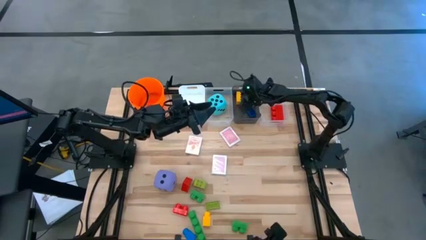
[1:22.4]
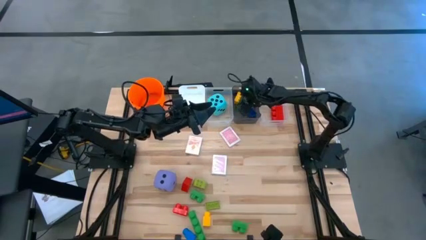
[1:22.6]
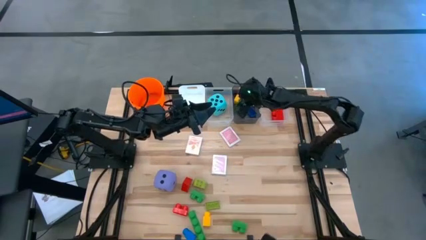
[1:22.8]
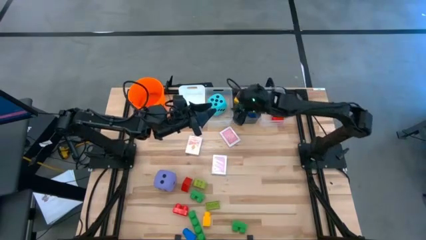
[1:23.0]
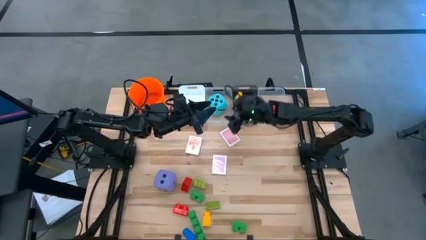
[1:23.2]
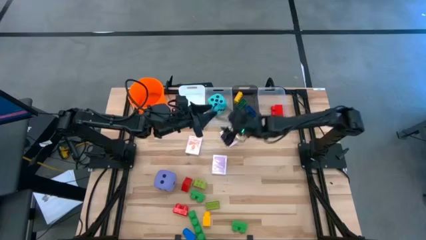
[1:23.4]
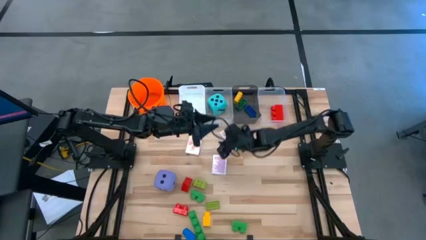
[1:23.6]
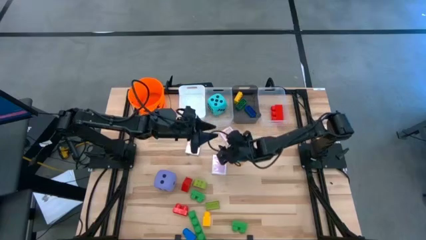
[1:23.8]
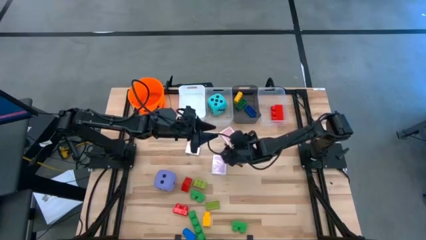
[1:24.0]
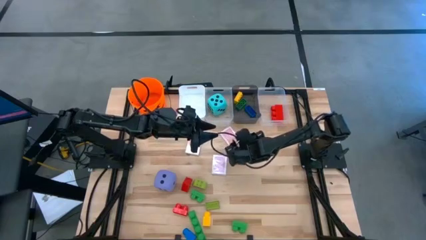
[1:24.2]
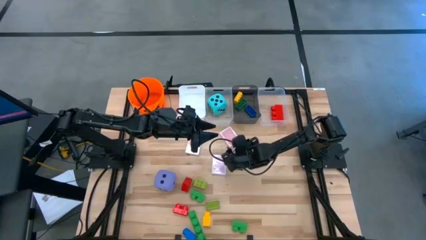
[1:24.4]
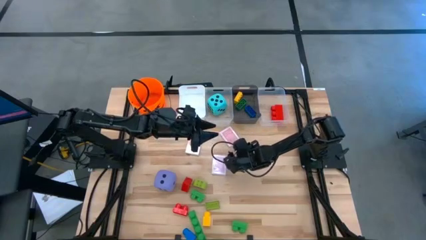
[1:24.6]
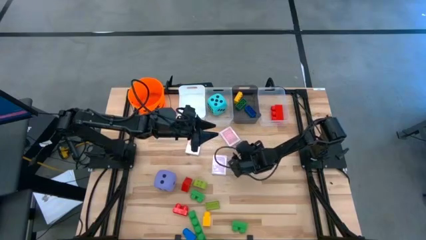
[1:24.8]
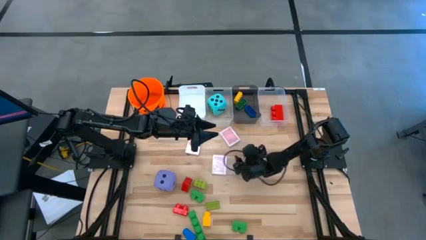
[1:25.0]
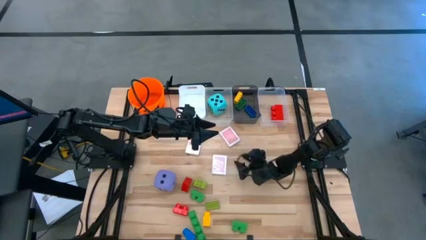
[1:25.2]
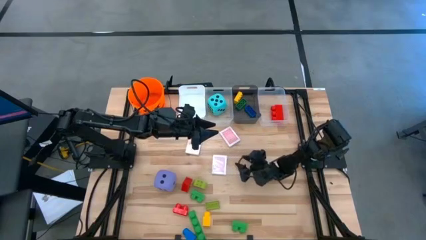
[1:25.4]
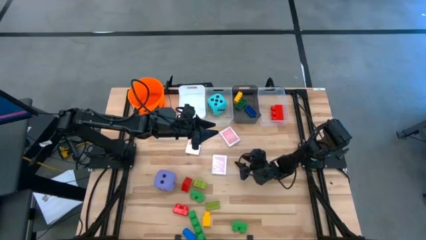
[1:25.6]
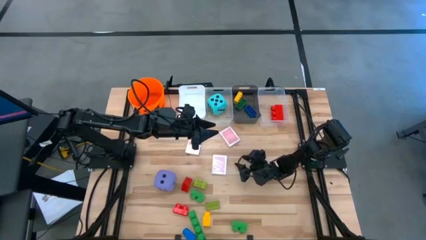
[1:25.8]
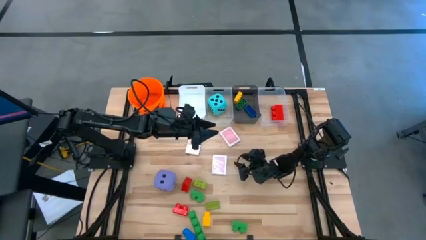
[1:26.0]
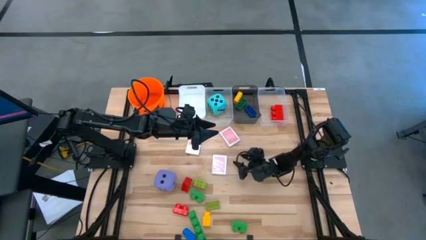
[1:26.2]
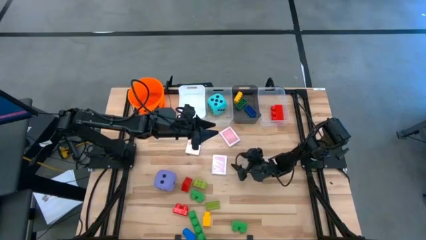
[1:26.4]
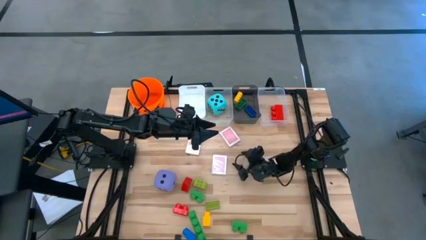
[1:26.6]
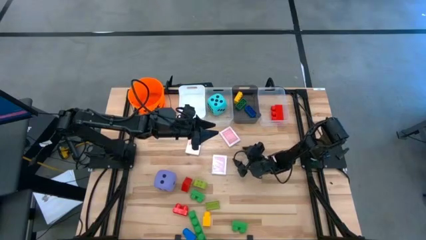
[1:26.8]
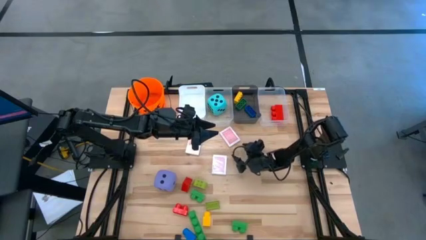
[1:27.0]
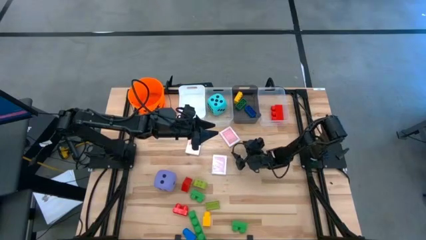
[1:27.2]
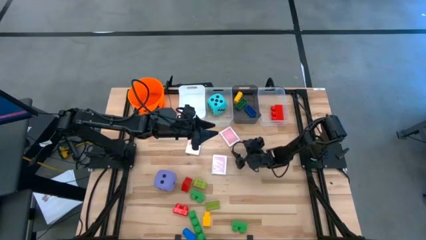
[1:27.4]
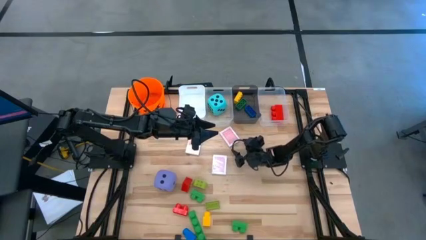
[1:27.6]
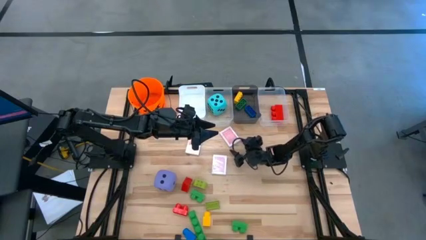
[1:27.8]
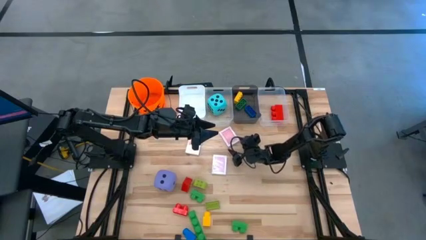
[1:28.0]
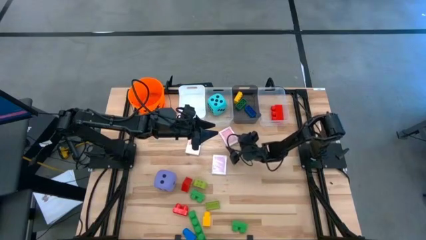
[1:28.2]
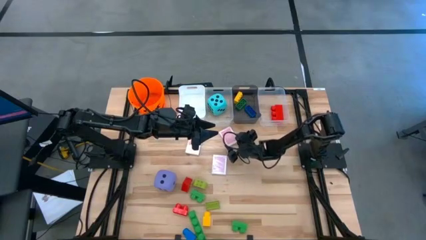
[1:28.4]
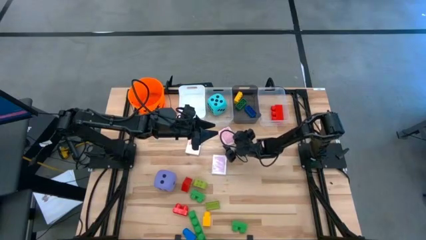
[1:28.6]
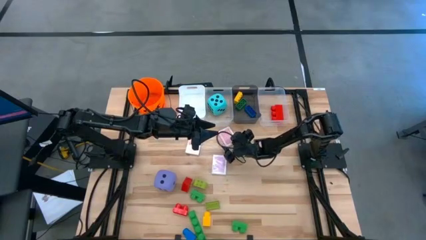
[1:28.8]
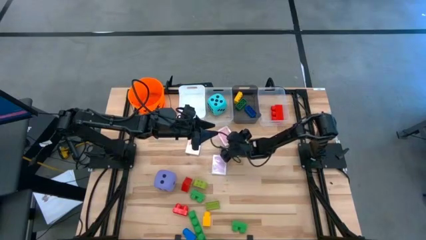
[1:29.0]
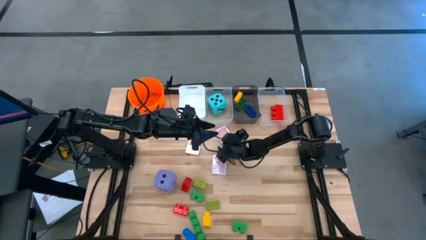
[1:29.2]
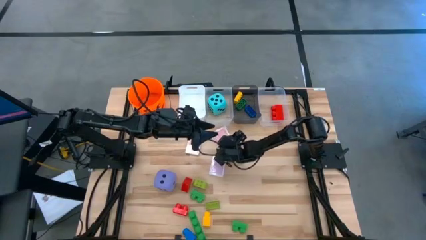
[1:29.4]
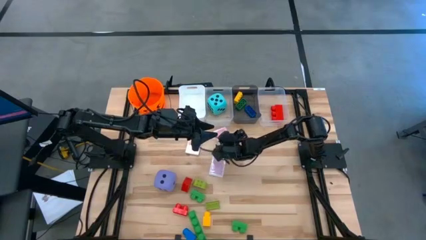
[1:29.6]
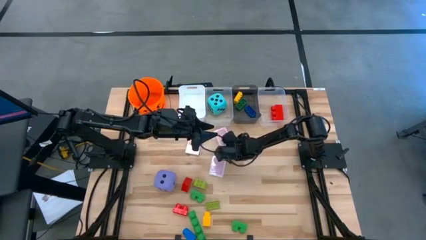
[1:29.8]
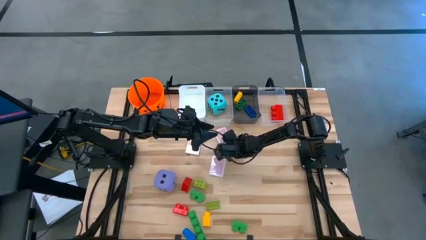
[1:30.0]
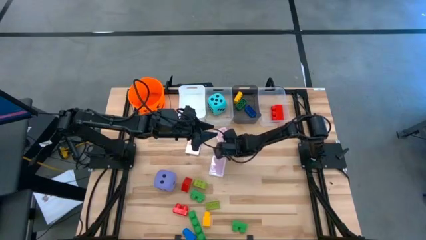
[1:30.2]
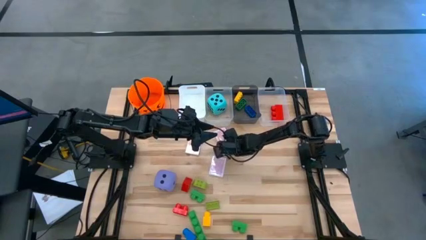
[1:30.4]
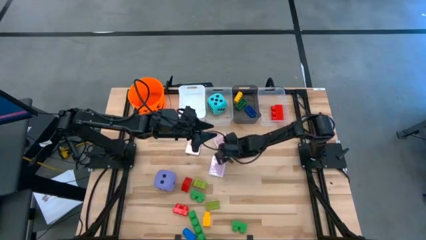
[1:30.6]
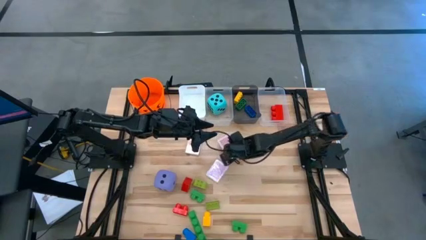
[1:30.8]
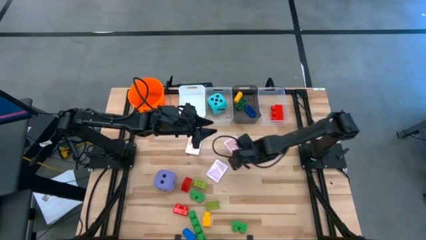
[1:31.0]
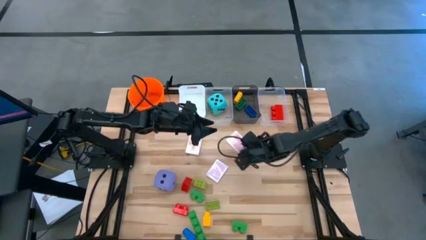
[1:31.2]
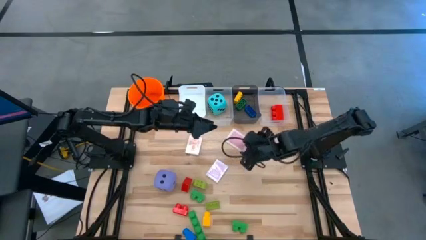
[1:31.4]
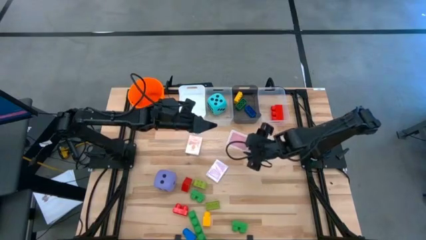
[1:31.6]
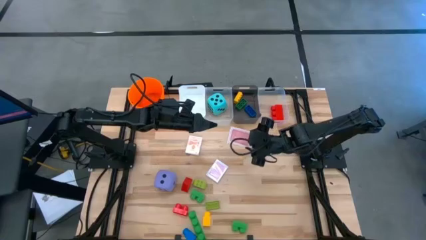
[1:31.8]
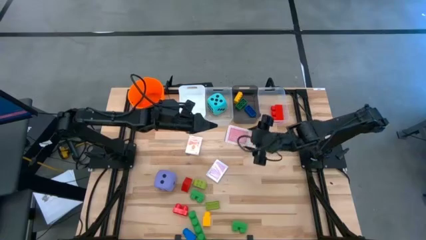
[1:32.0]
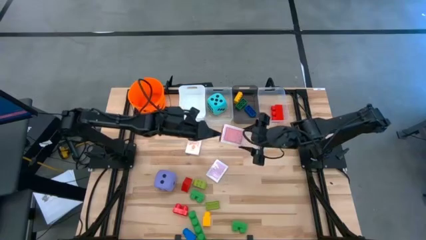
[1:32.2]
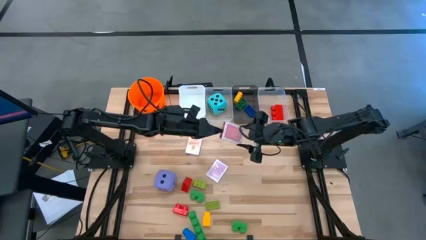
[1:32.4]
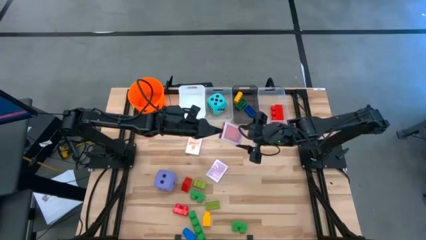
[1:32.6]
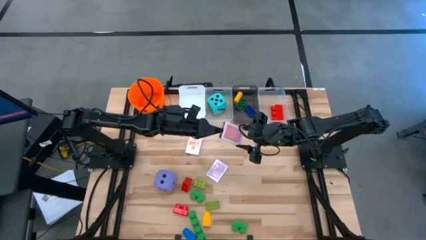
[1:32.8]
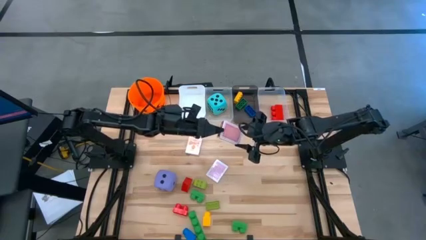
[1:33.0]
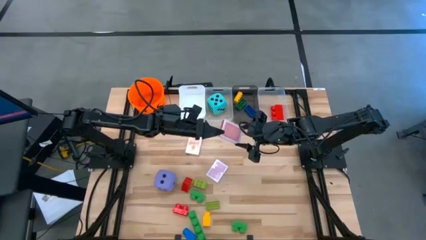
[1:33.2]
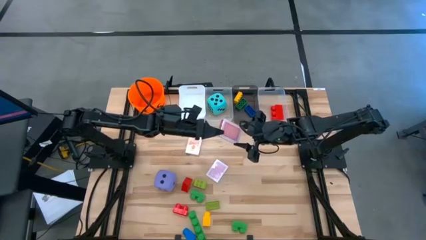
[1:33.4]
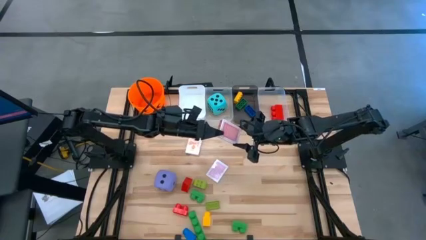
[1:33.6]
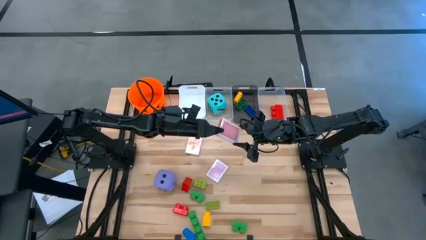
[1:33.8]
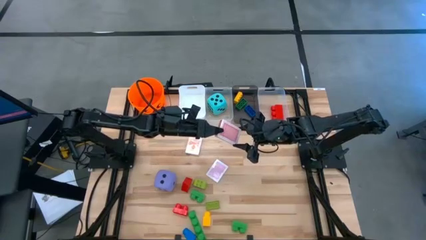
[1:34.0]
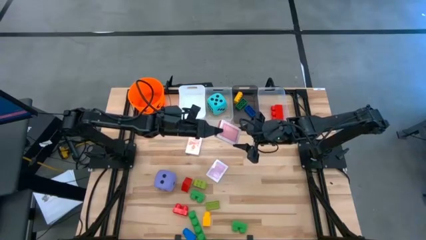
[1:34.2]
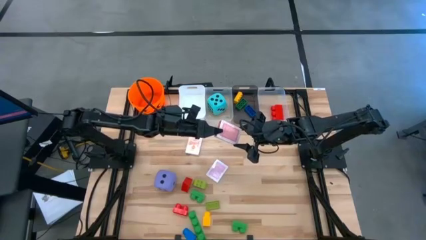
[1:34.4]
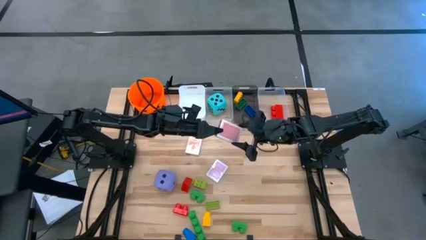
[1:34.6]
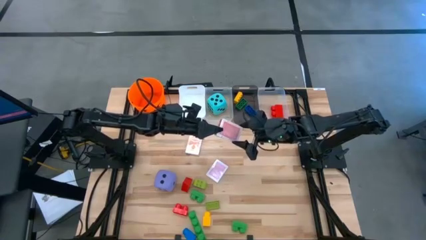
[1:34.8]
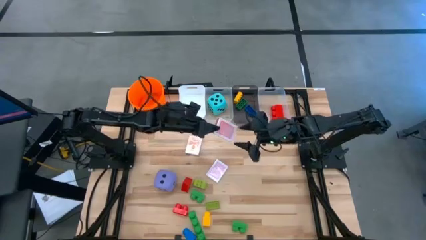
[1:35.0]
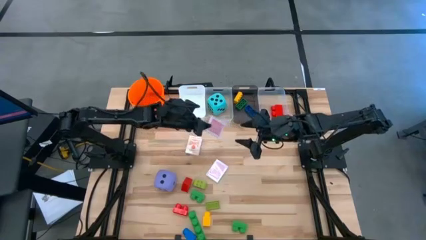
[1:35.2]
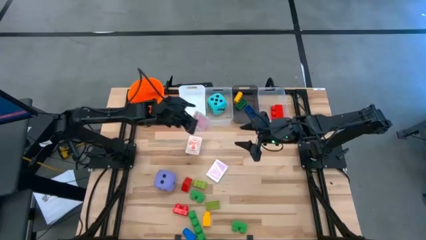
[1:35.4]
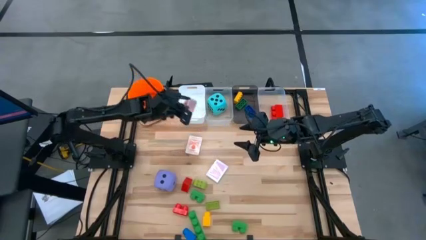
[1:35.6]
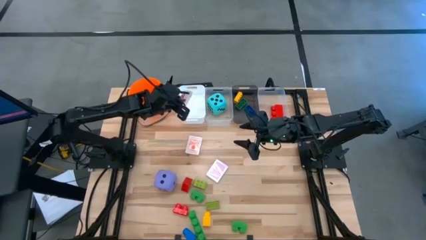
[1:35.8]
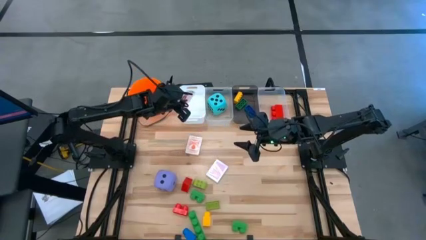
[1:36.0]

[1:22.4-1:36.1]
Task: Pick & Place Toys
Put the red deck of cards into the white bin
